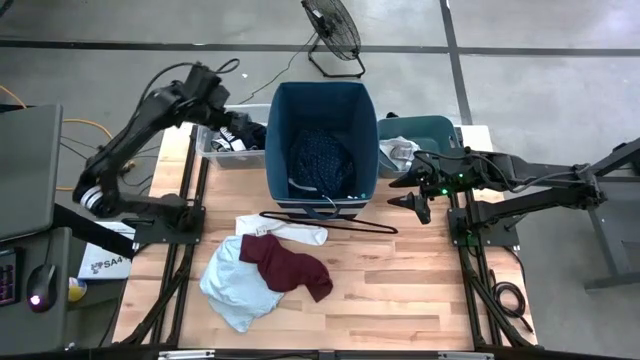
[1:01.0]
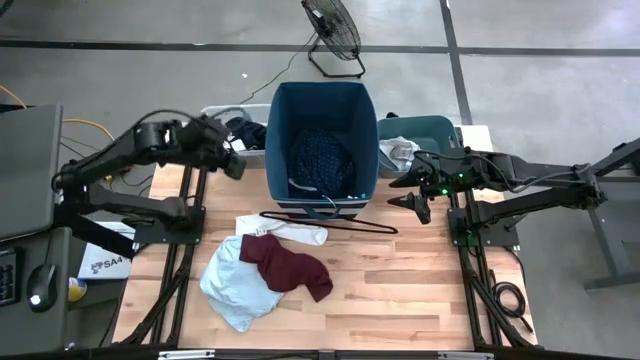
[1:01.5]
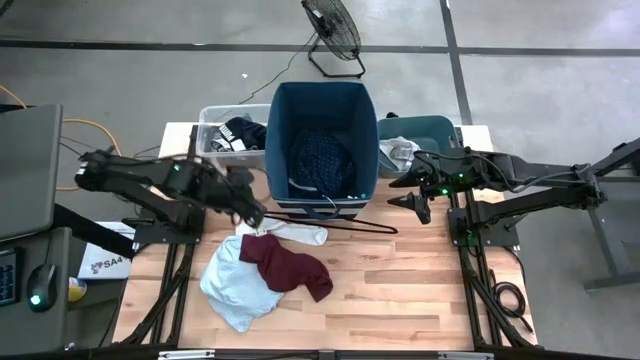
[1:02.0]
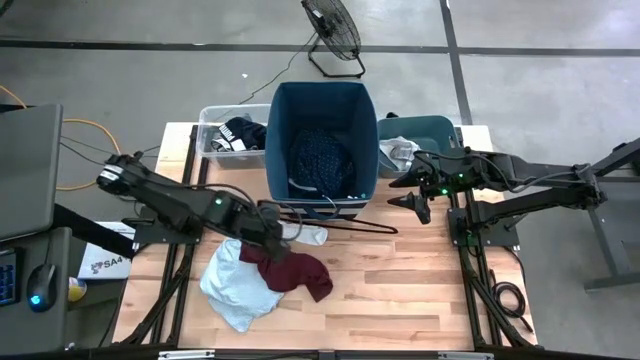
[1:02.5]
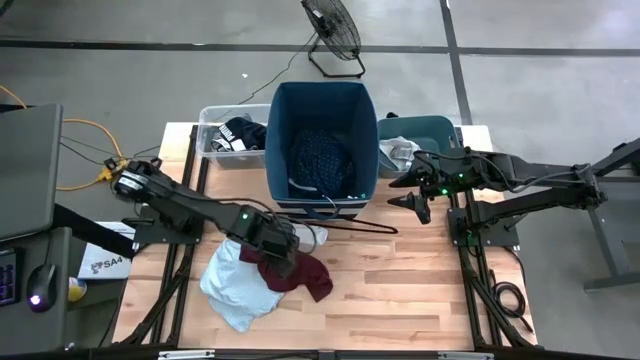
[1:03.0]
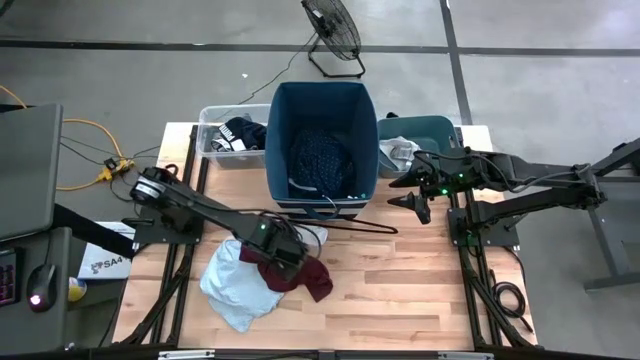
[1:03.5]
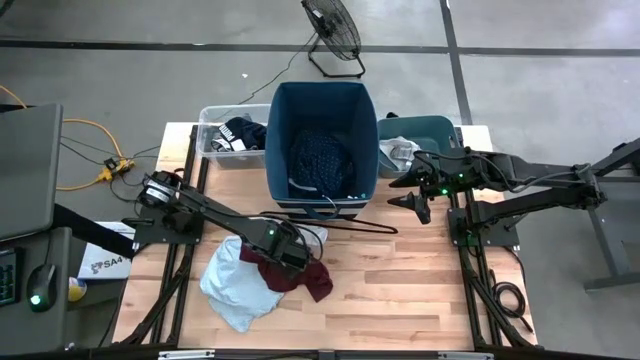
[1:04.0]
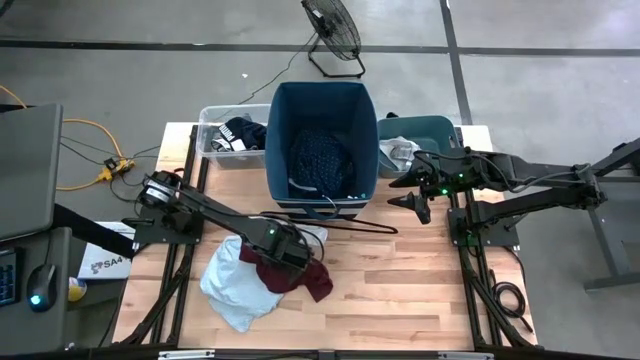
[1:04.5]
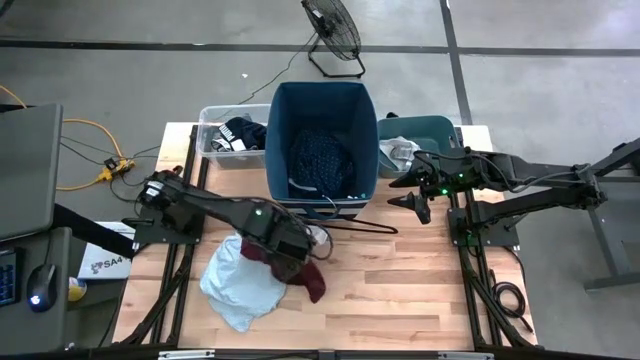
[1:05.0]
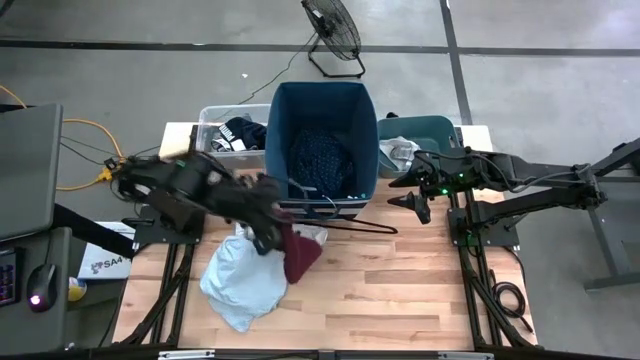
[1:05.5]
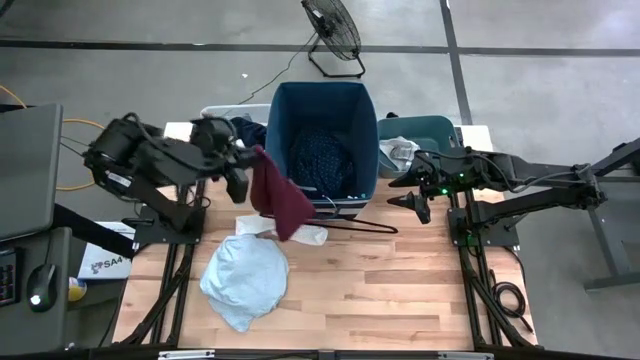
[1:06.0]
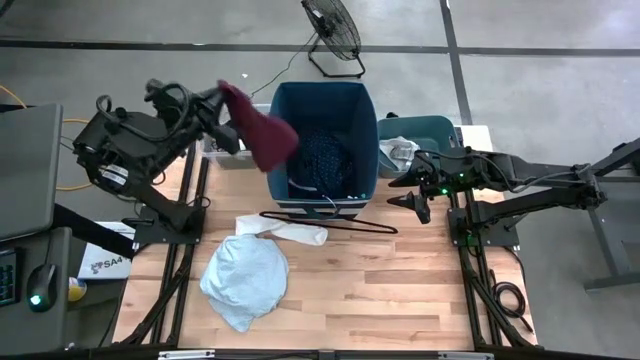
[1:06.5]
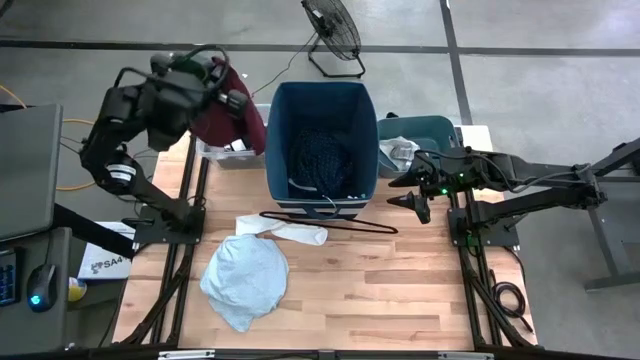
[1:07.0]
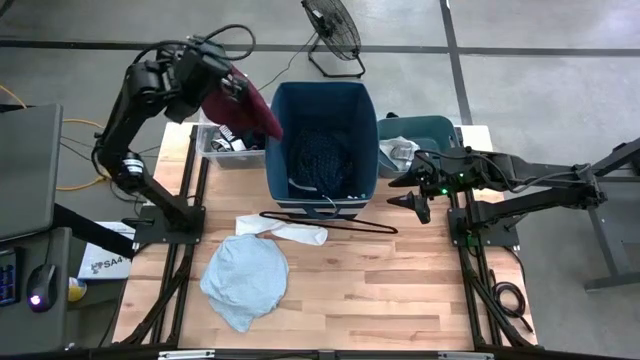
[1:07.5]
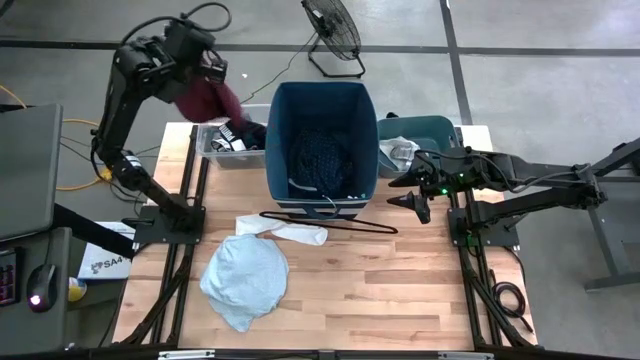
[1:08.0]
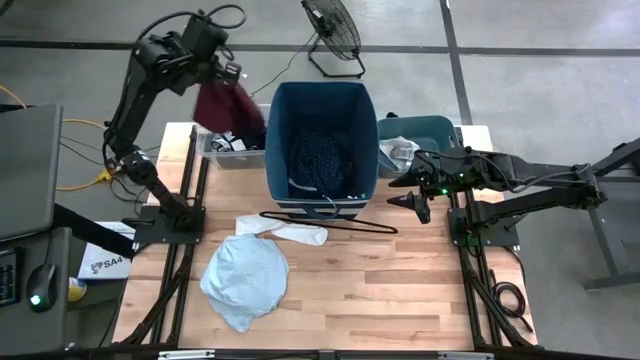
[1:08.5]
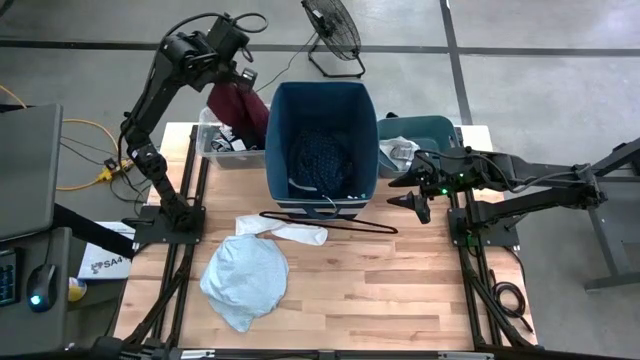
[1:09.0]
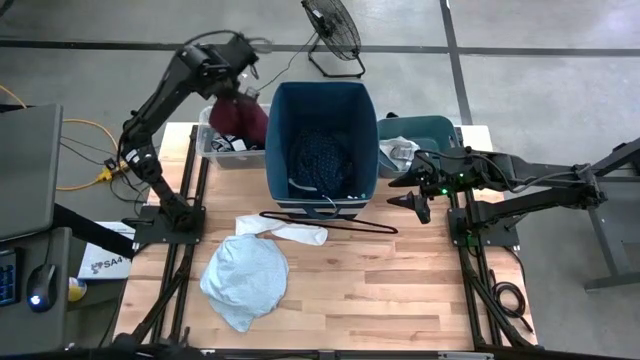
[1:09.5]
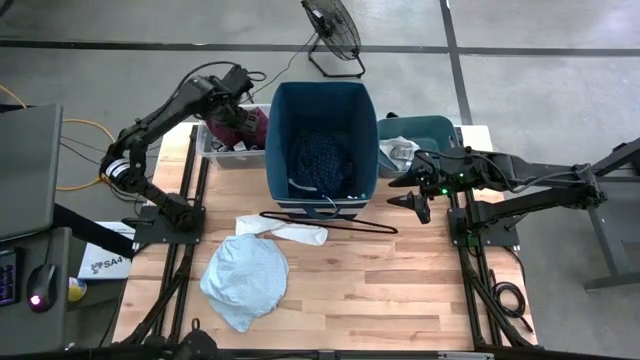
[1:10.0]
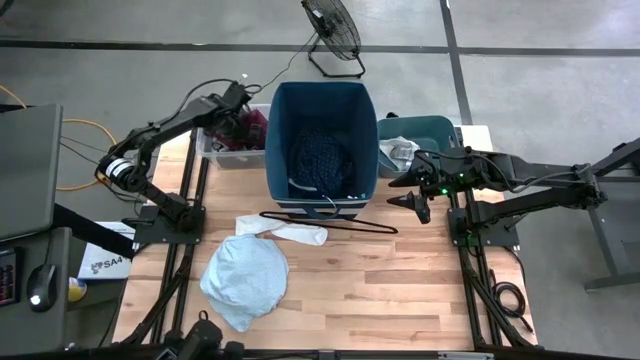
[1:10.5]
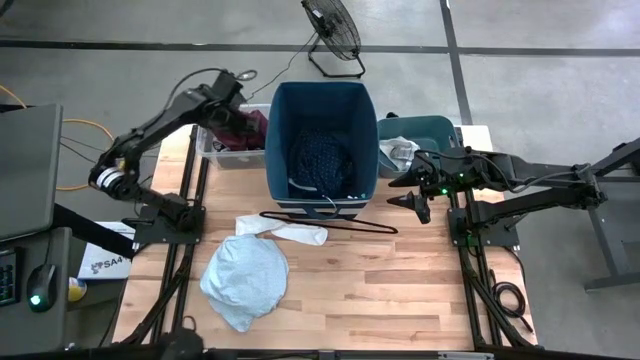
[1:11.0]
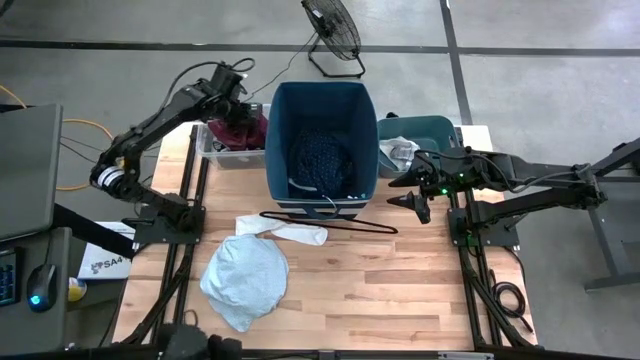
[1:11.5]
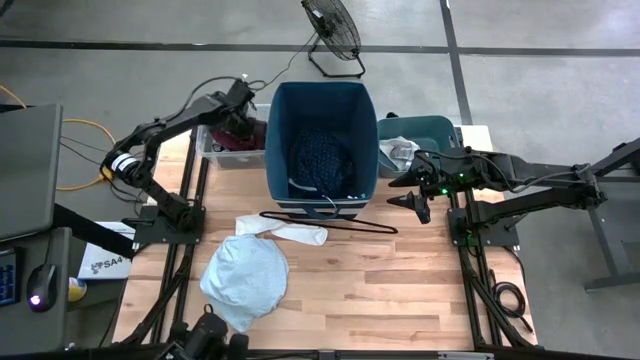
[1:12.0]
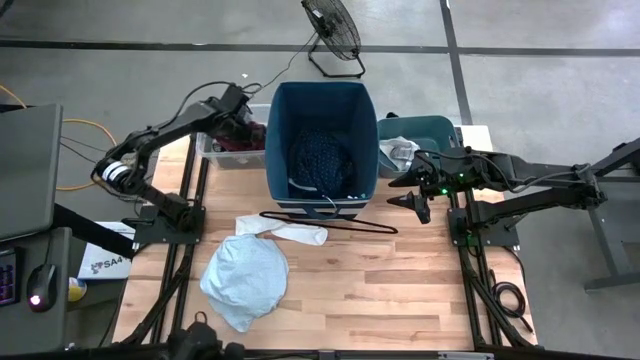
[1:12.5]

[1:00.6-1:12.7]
Task: Pick & Place Cloths
Put the red underwear into the transparent bin

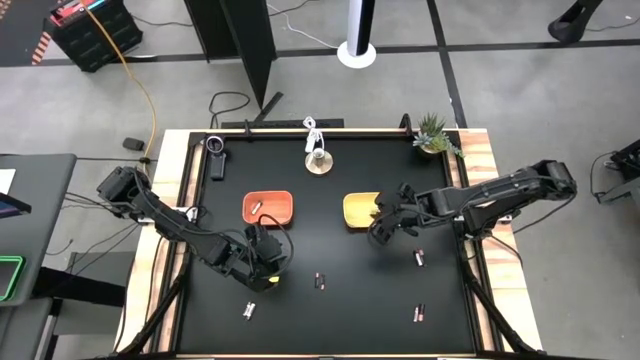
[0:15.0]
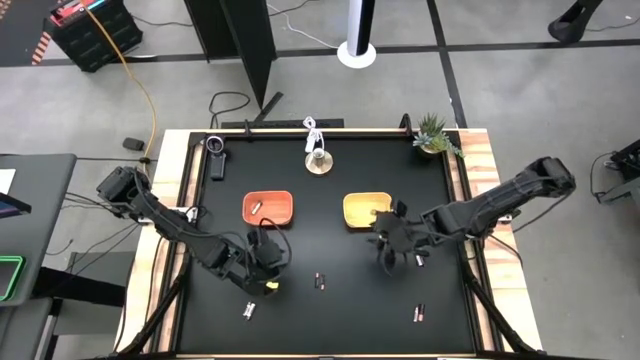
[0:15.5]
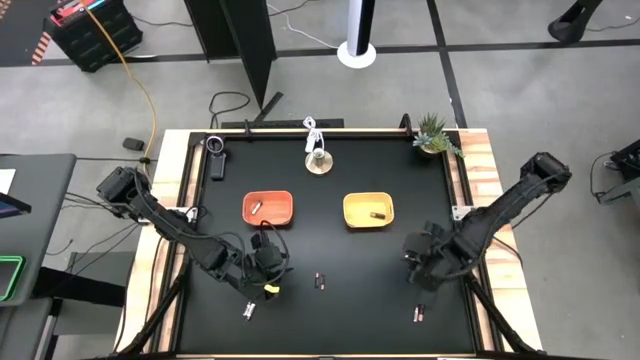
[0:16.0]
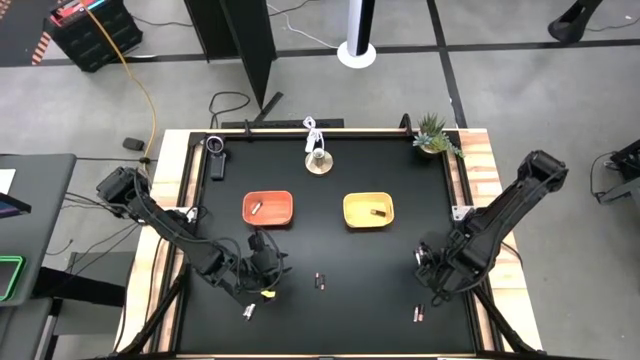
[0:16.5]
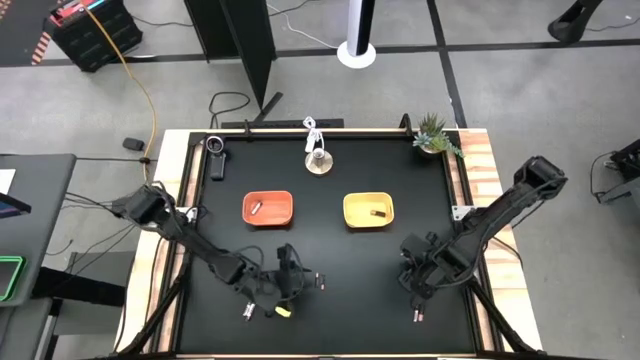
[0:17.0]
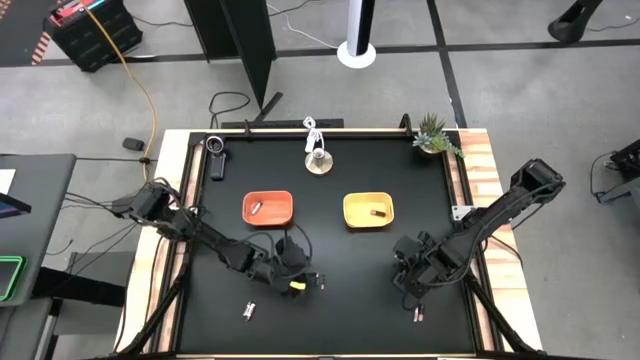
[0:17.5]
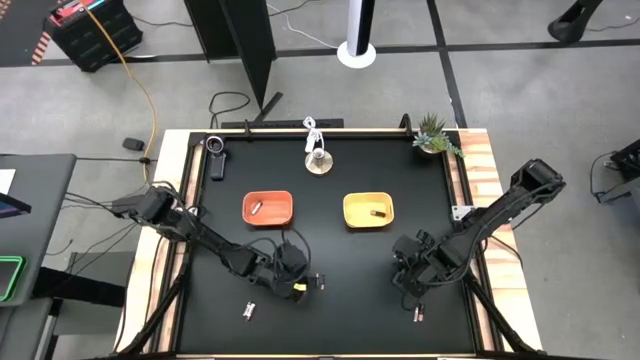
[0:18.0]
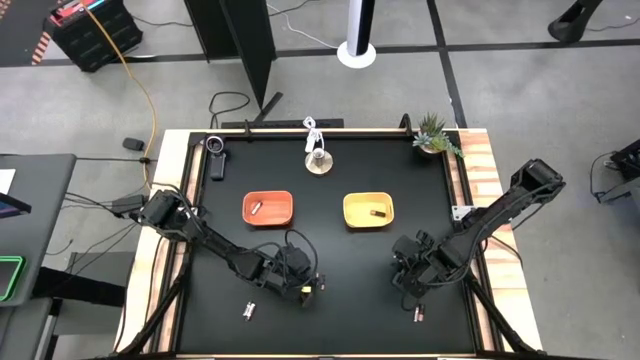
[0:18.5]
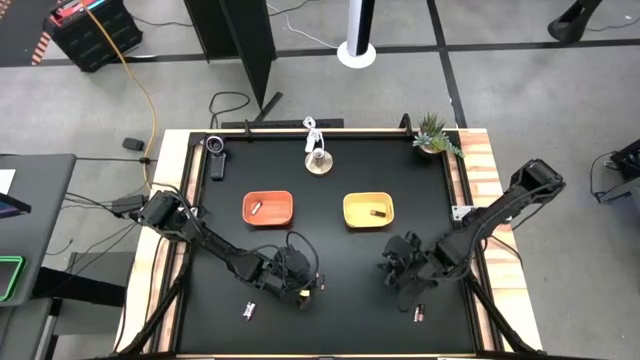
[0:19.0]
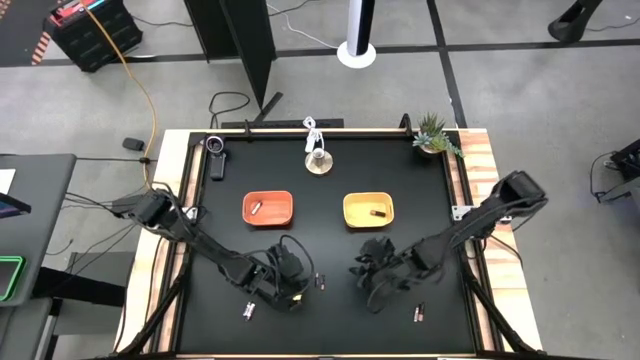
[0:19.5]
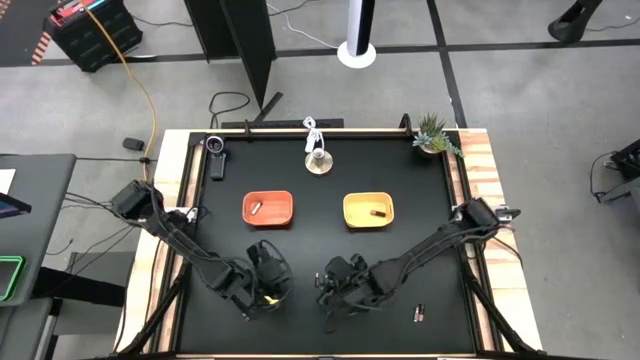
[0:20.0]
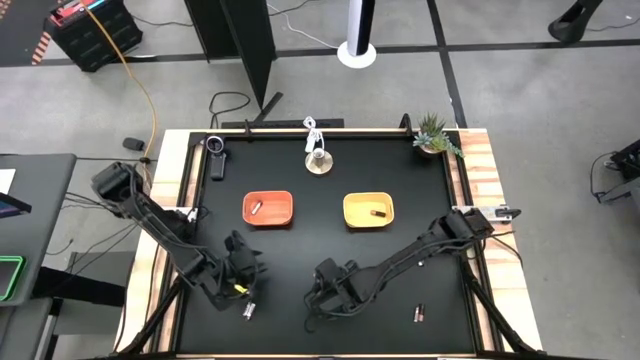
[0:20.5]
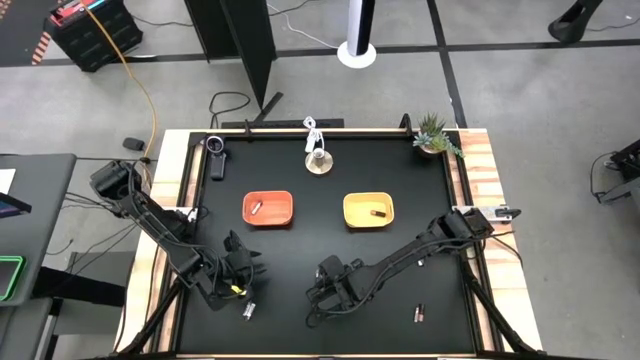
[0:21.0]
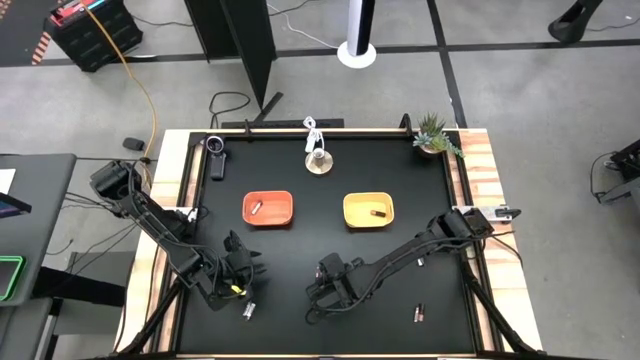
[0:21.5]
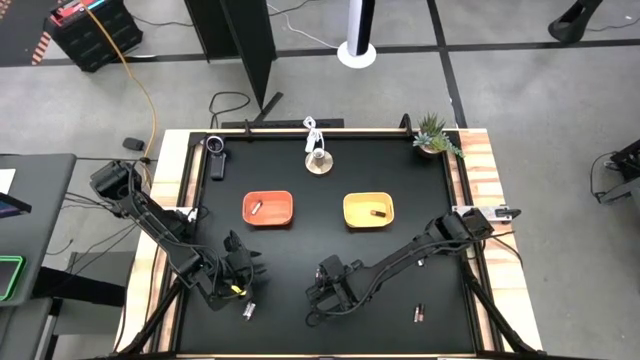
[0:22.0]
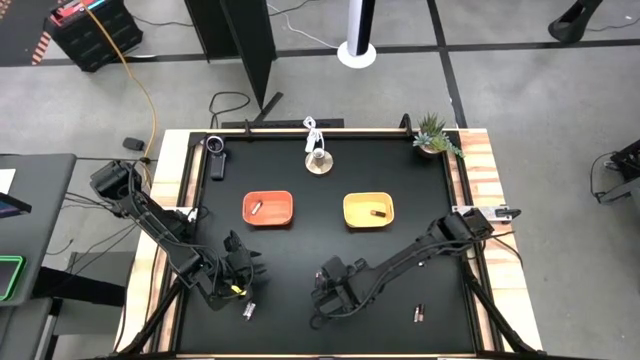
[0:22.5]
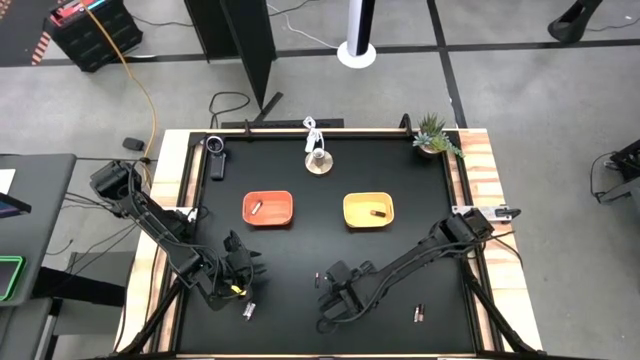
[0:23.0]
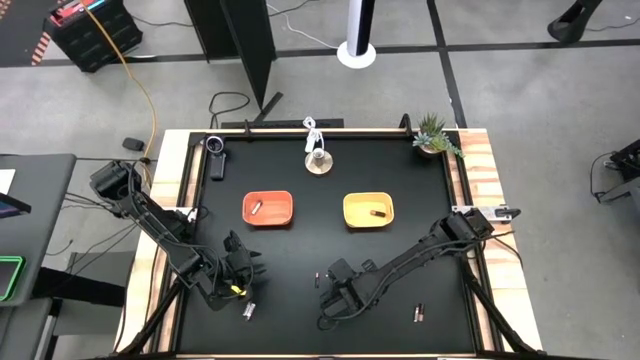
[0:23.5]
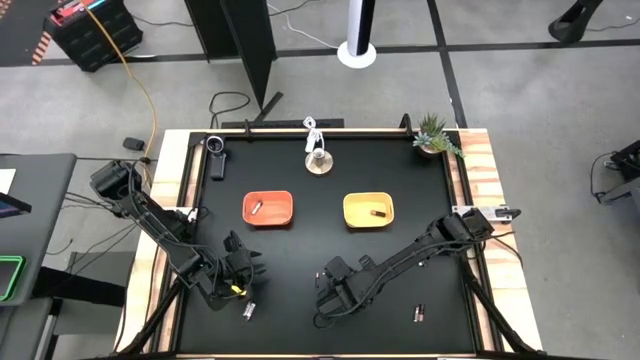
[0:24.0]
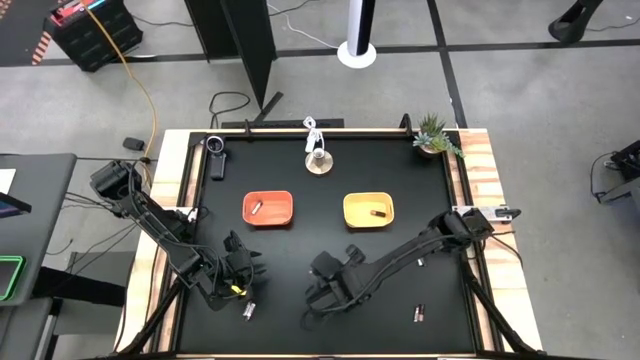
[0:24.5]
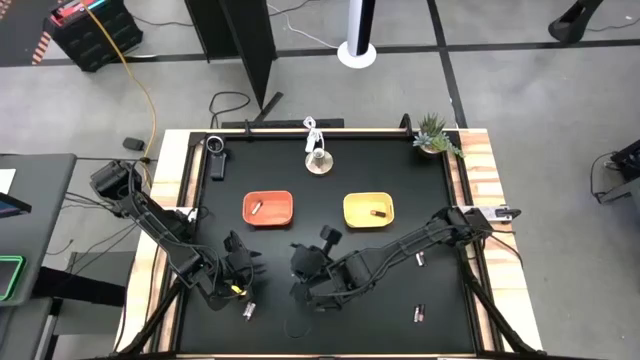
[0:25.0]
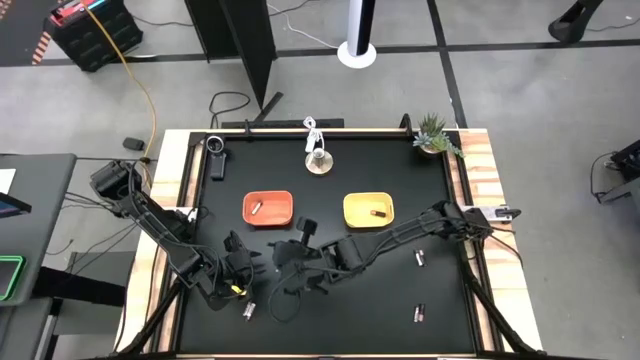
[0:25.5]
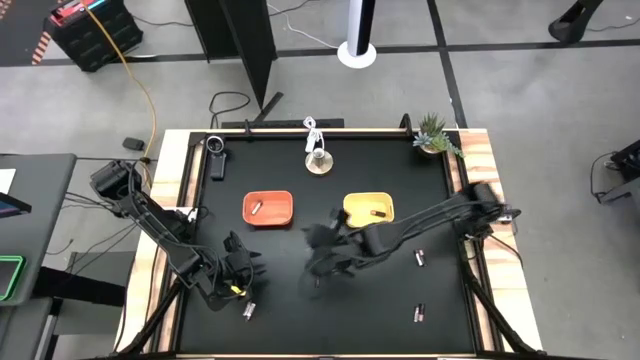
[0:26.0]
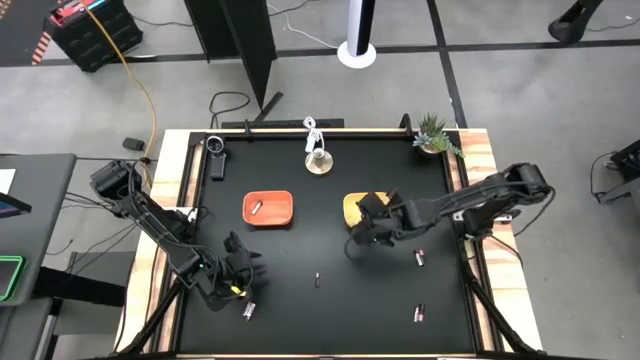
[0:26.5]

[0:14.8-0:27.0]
Task: Sort batteries
Put the black battery into the yellow bin
